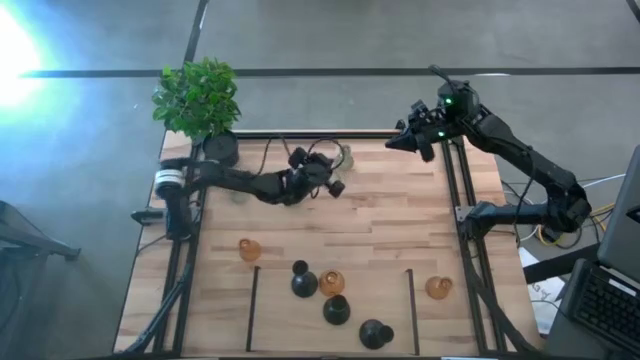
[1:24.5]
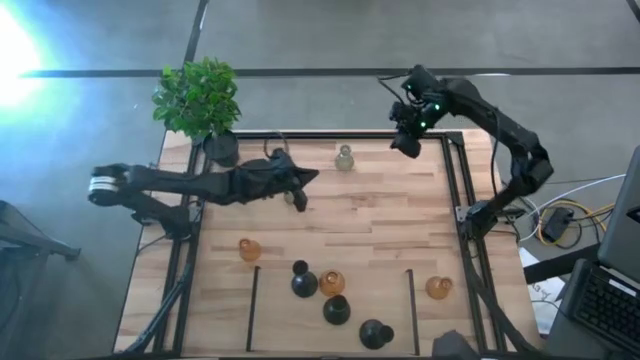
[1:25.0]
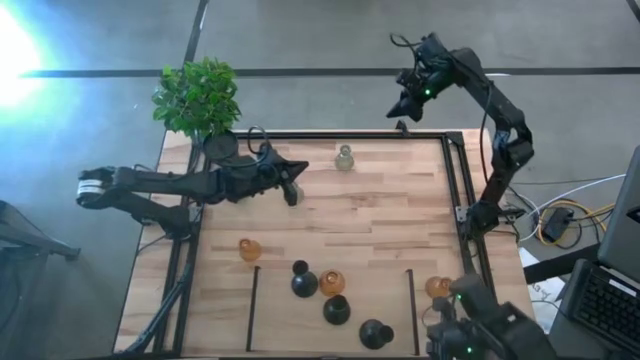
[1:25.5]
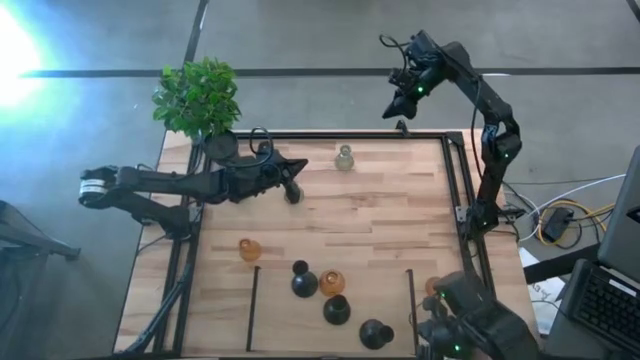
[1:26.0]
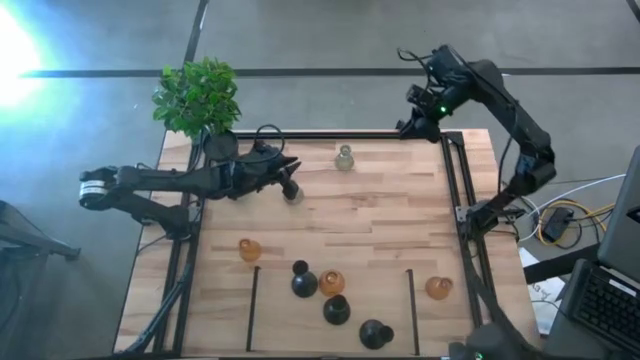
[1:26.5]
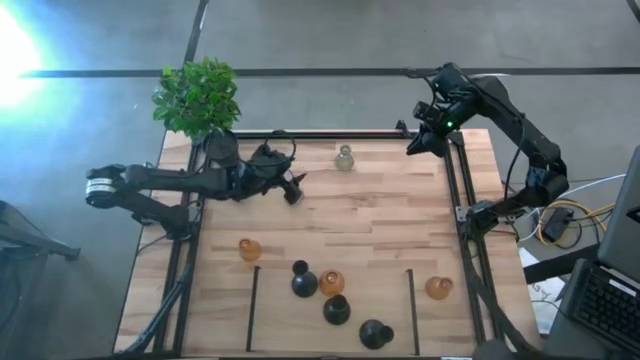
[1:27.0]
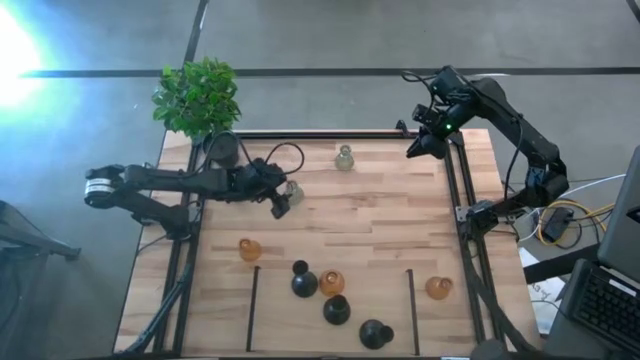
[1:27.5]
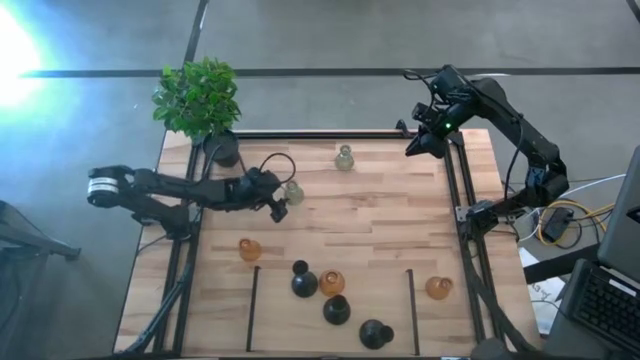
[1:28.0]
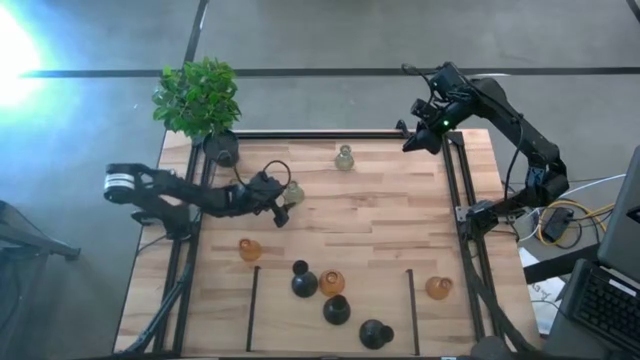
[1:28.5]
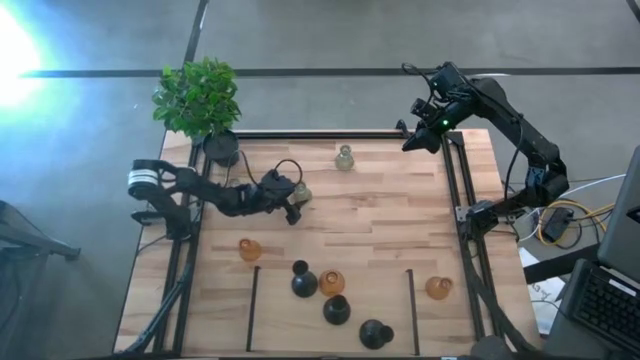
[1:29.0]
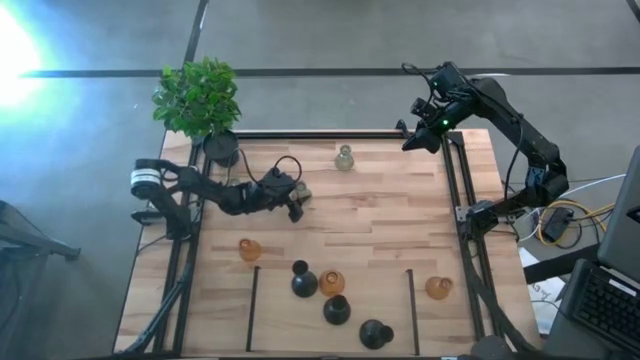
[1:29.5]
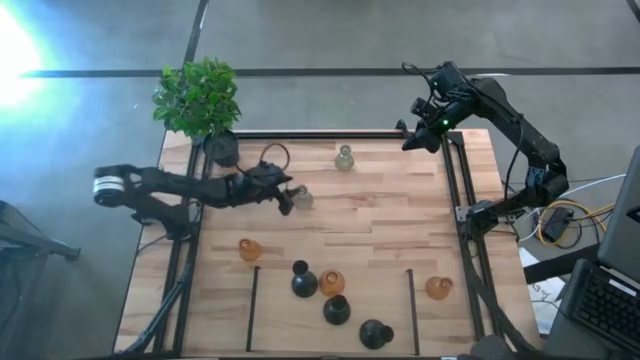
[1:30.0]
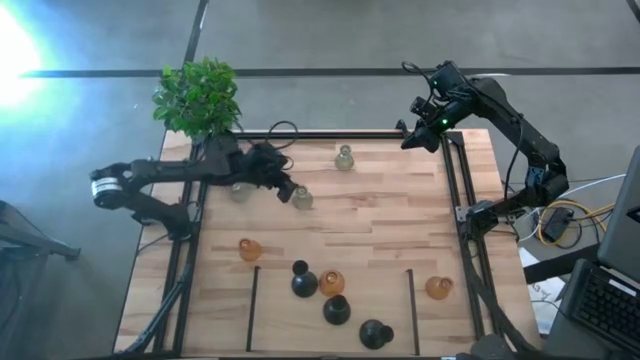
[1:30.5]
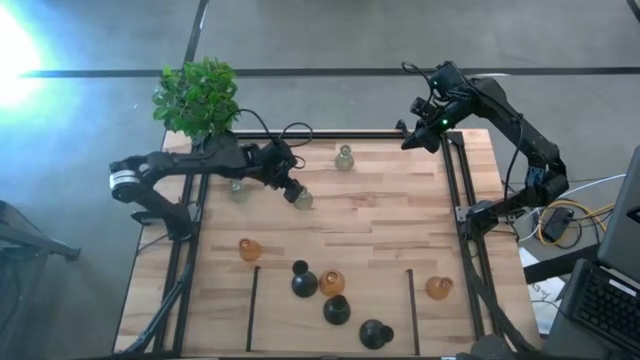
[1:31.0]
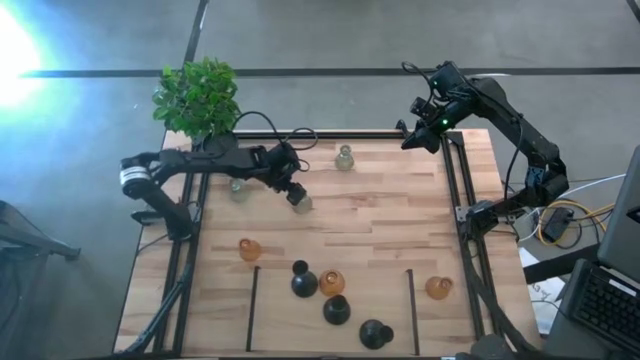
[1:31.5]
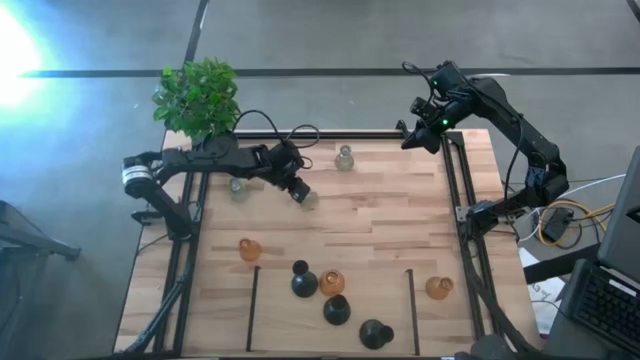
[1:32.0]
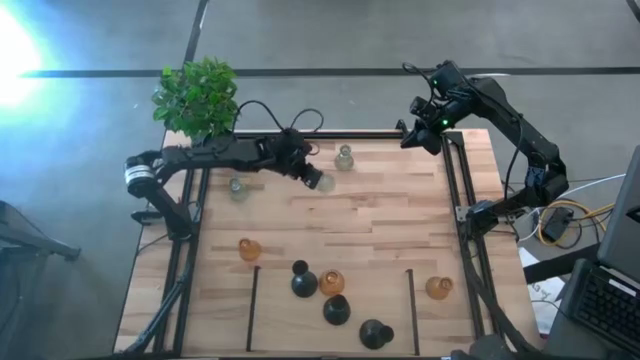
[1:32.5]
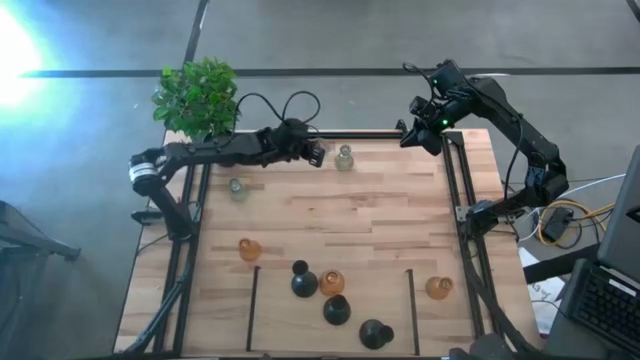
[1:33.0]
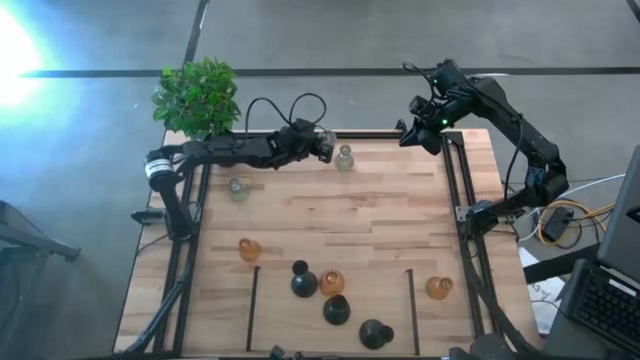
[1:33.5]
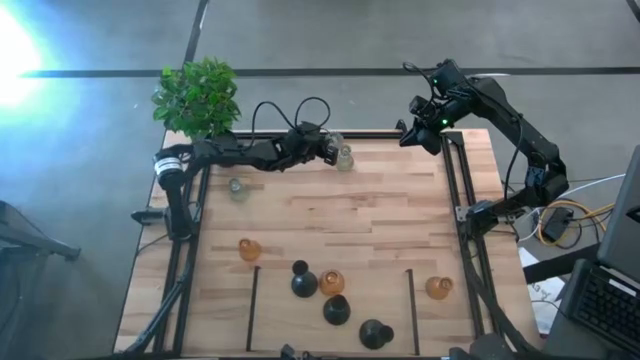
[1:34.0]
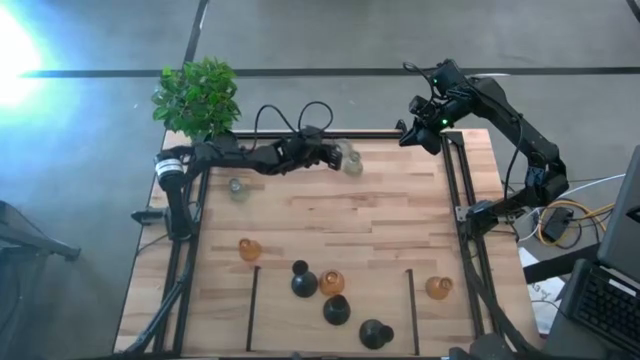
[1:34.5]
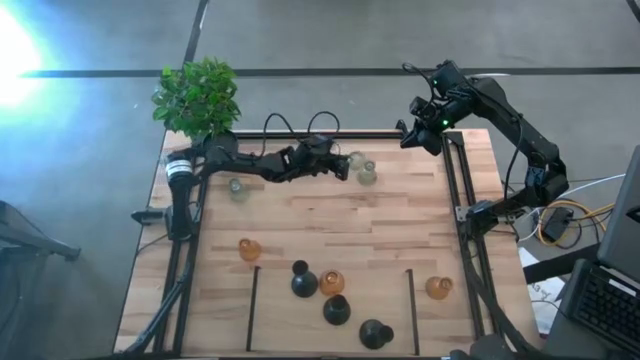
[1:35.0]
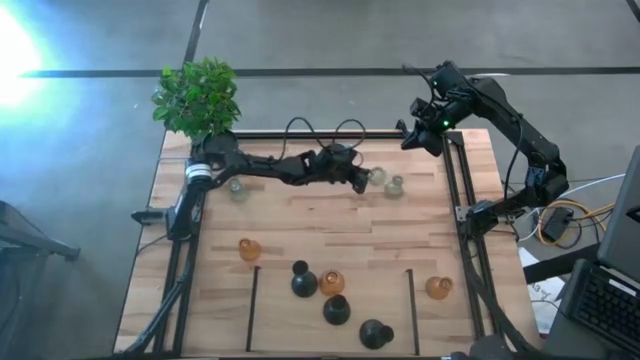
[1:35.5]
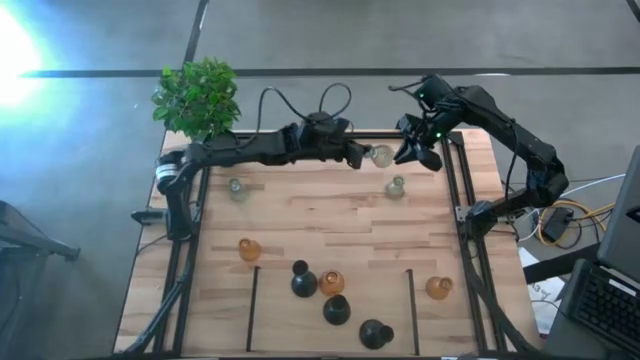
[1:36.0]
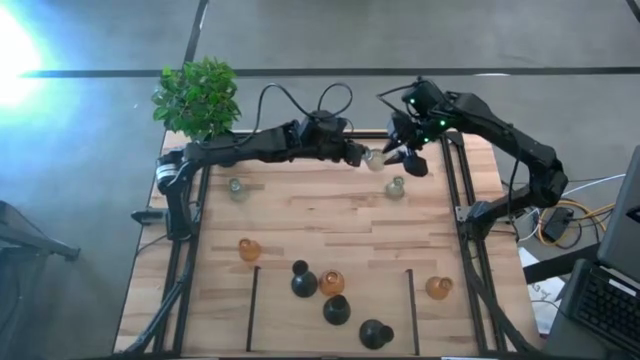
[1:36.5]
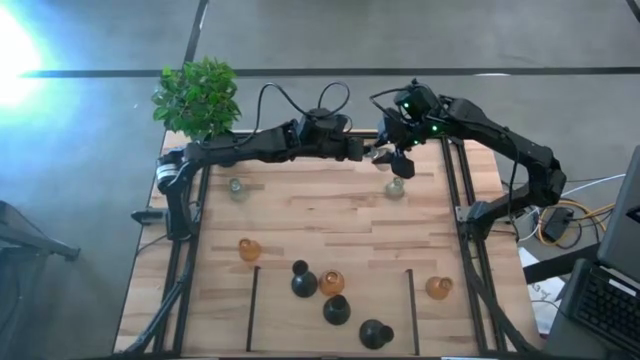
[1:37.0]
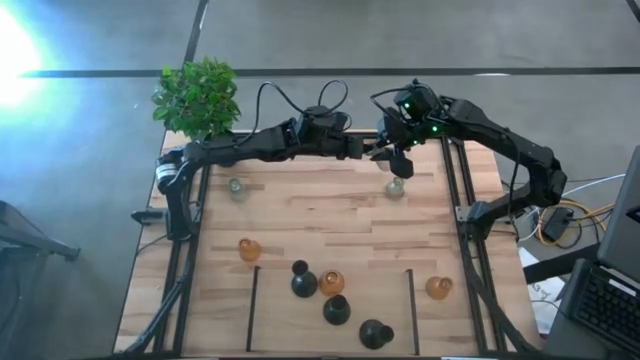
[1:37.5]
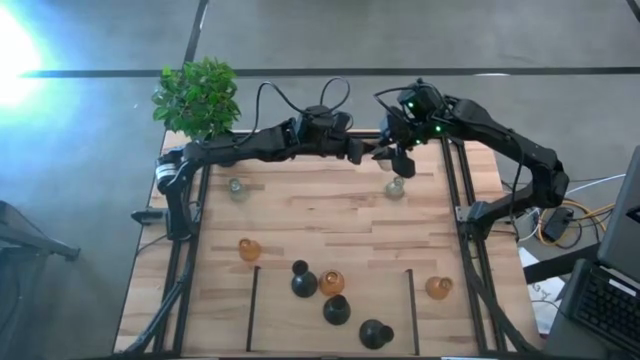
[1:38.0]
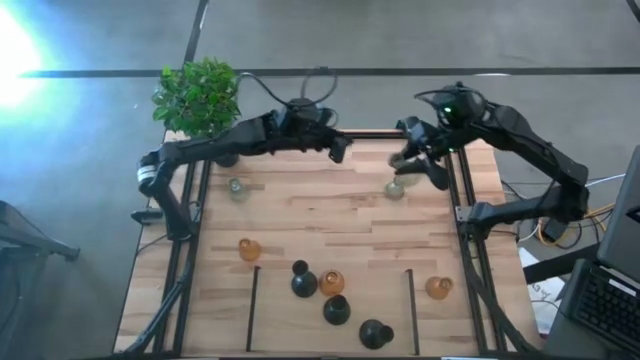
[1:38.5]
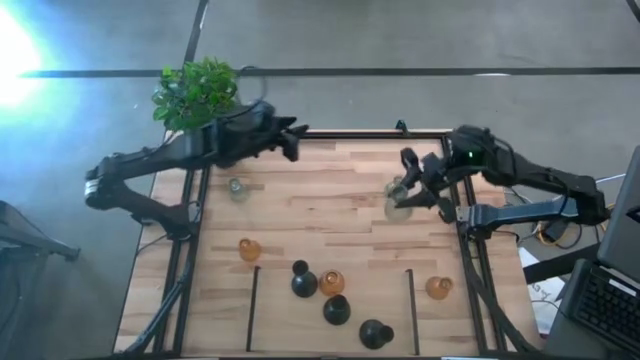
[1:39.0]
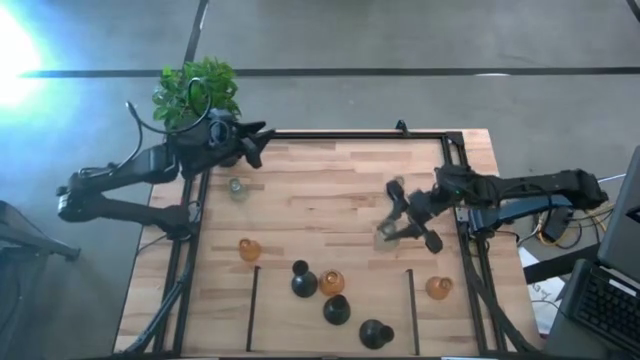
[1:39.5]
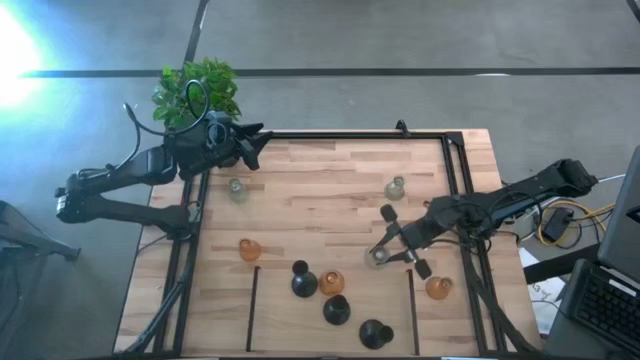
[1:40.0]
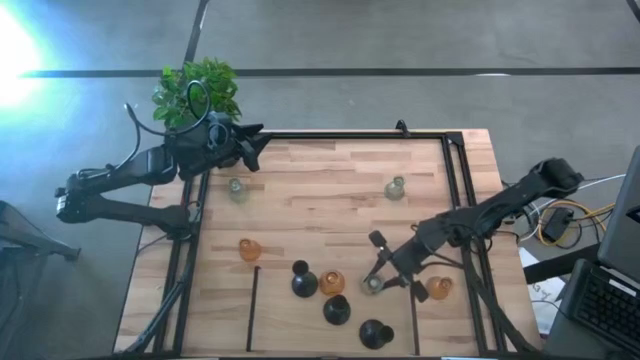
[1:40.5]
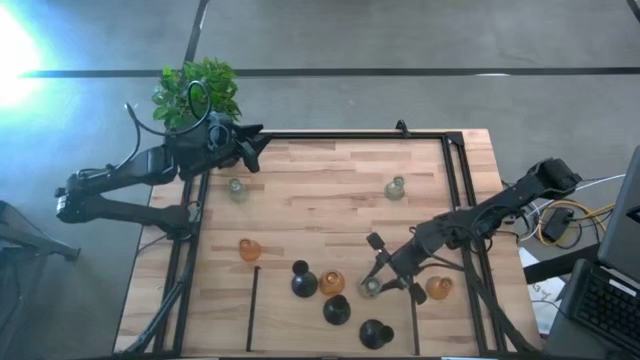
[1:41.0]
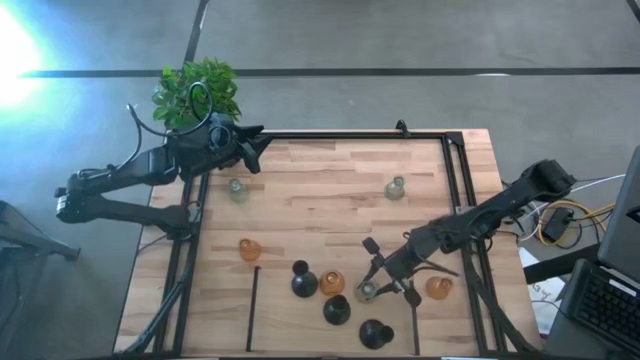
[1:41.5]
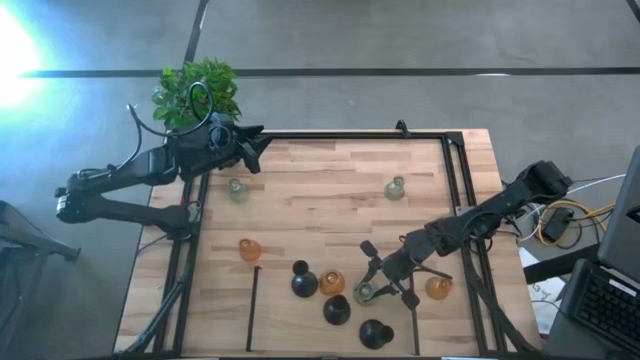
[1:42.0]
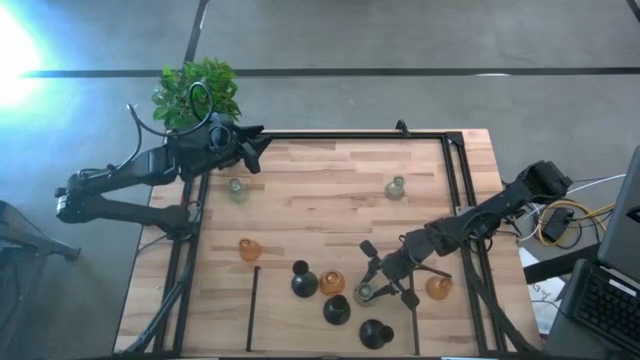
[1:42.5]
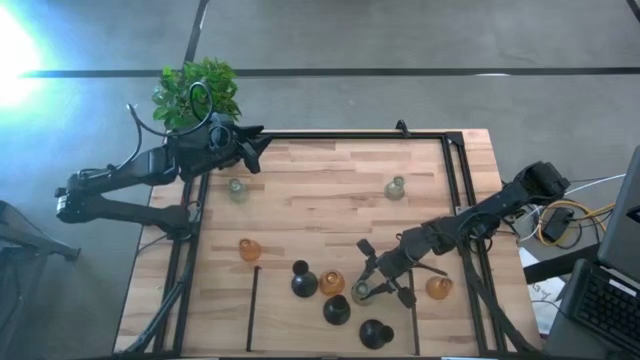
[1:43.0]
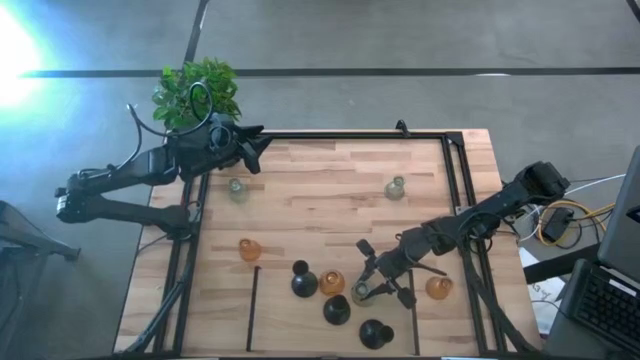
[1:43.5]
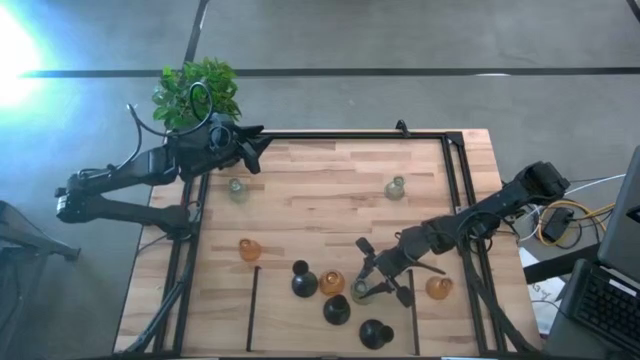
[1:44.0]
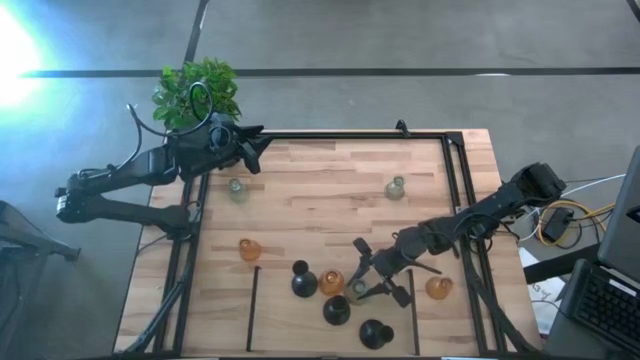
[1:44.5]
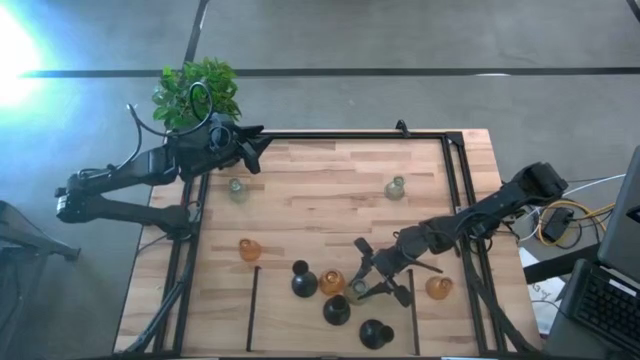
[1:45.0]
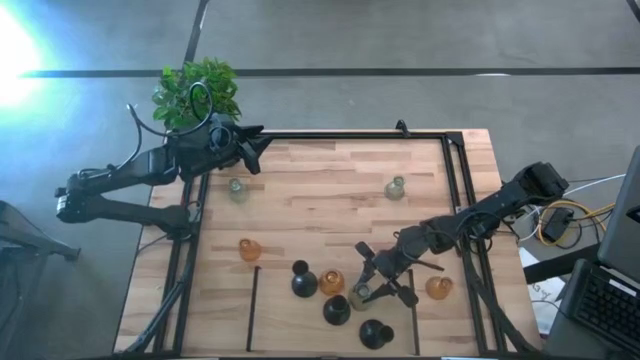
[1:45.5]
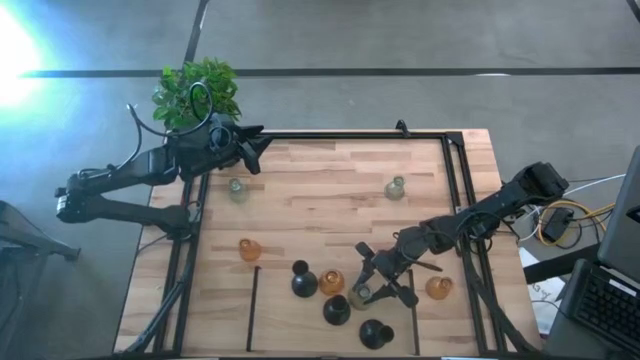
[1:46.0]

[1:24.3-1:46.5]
Task: Pick & Place candle stick holders
Put the bottom right transparent glass candle holder on the shelf
